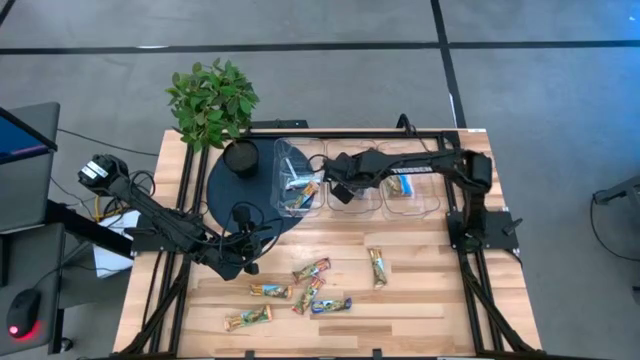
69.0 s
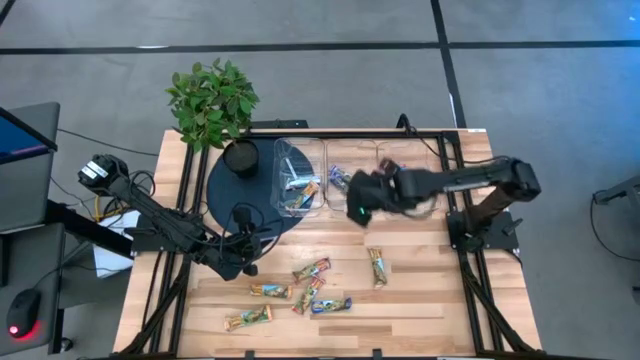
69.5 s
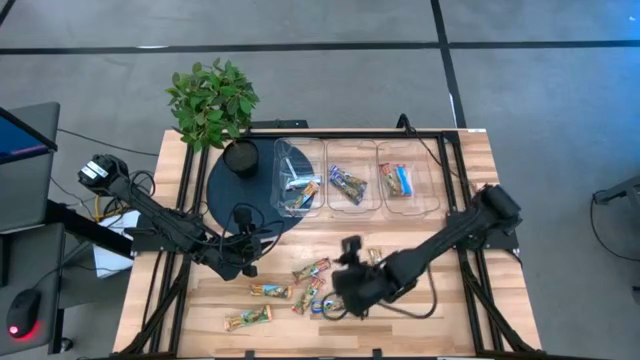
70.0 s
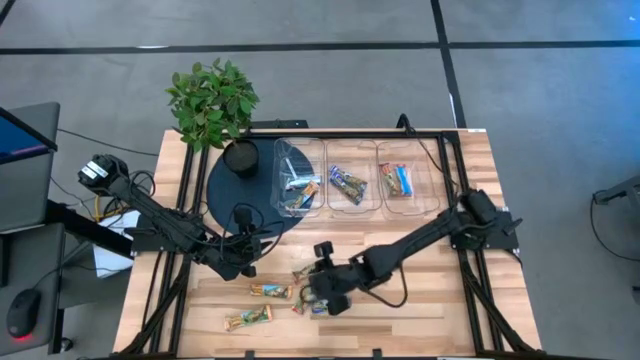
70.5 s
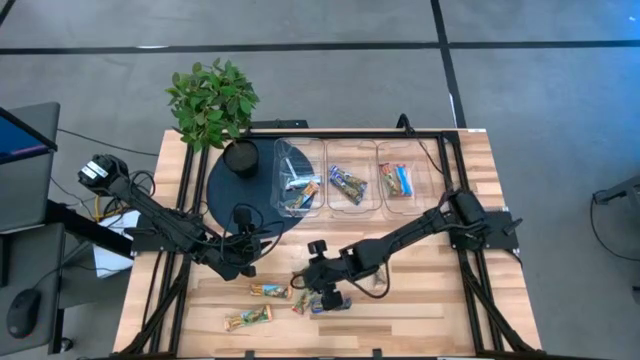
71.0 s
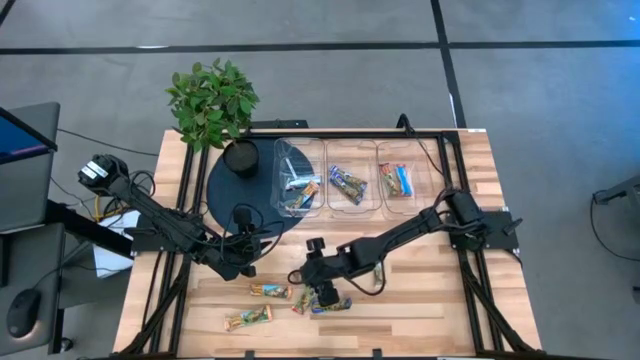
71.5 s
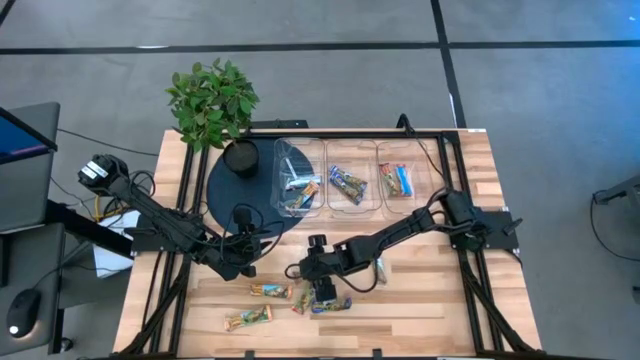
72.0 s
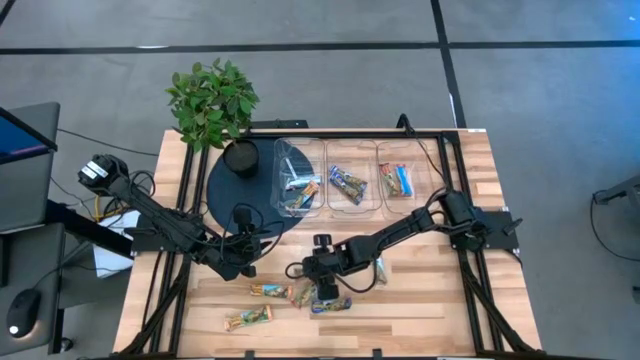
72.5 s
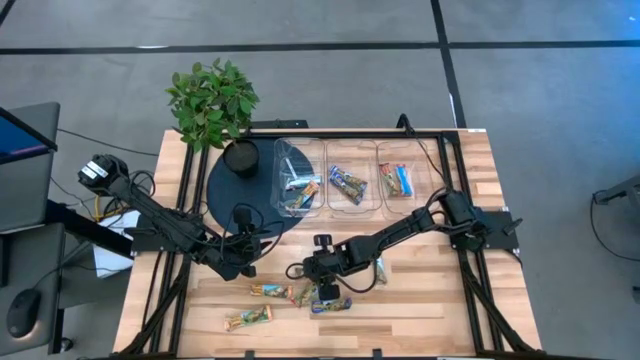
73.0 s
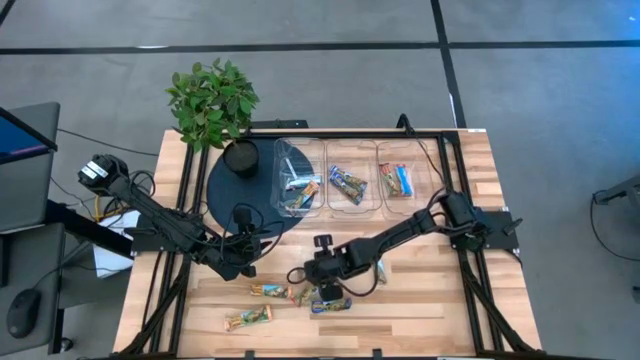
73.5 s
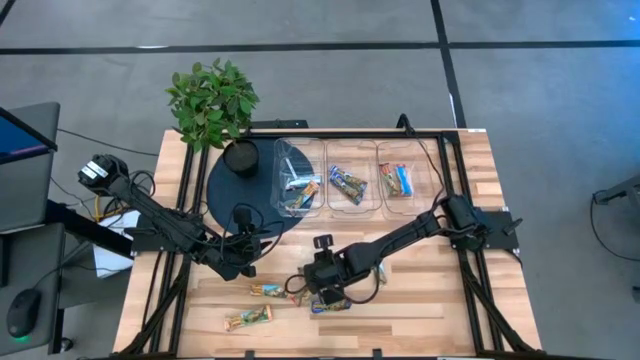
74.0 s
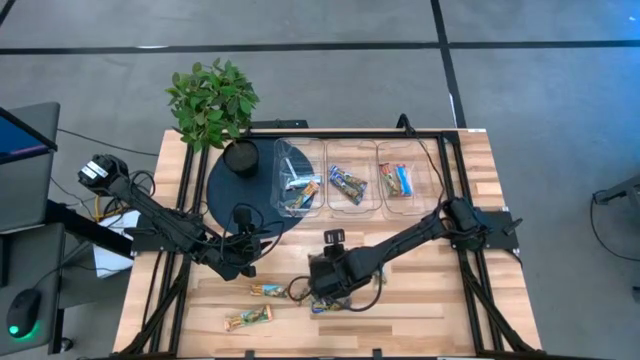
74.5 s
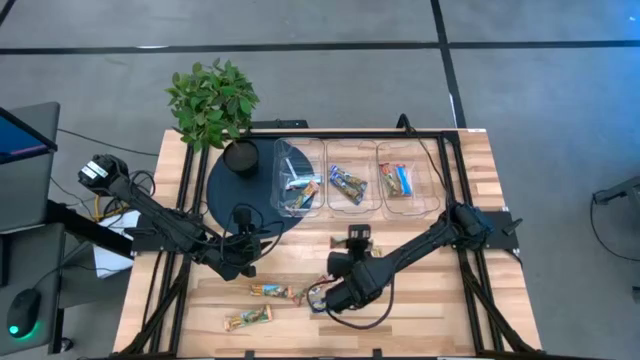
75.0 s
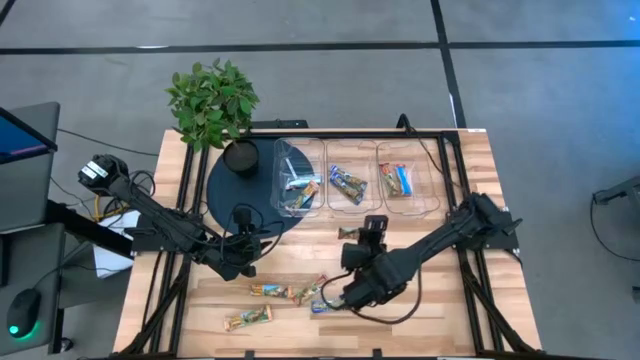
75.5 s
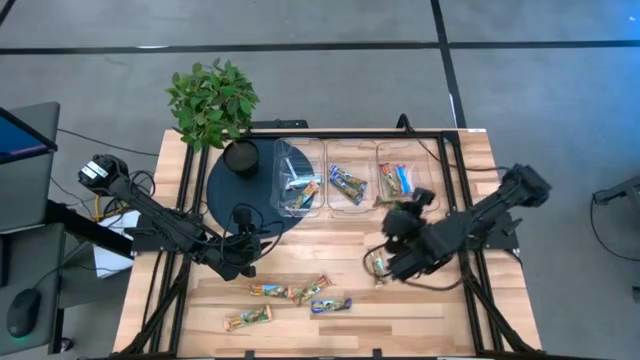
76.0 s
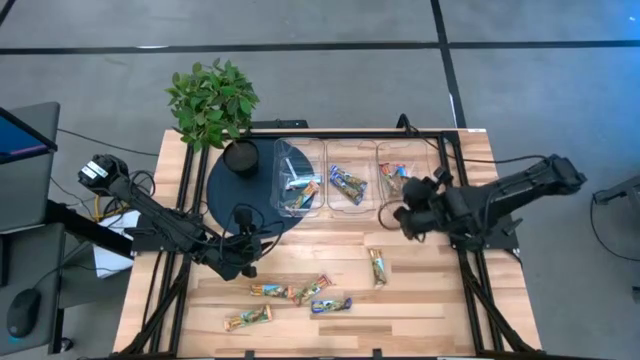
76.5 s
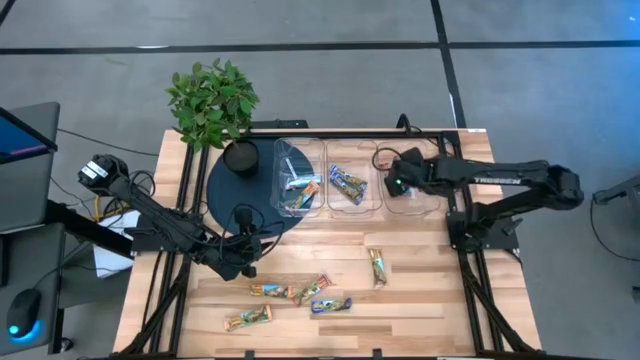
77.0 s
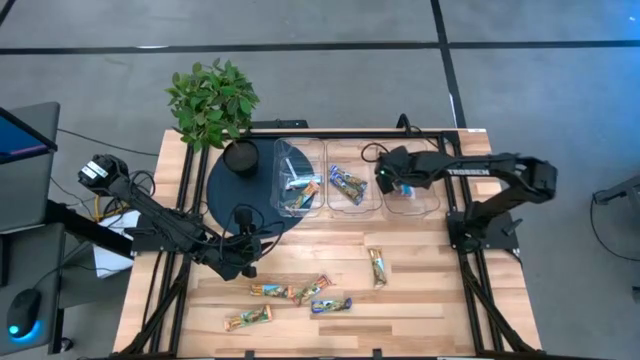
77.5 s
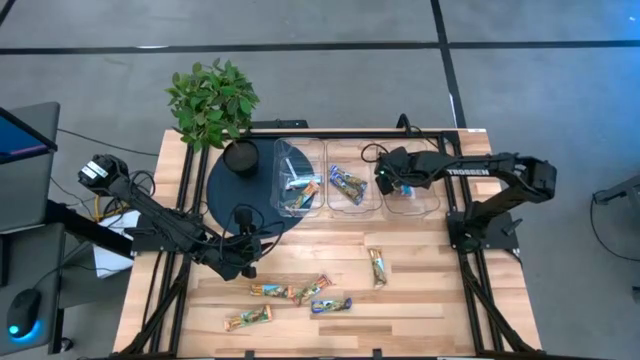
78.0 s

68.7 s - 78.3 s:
Task: Pick and place Granola Bars by type
Put the red granola bar into the right transparent bin

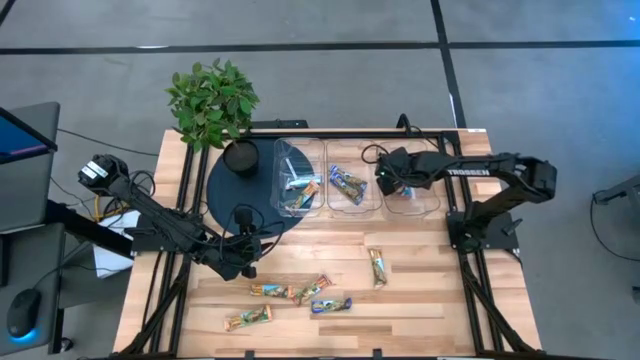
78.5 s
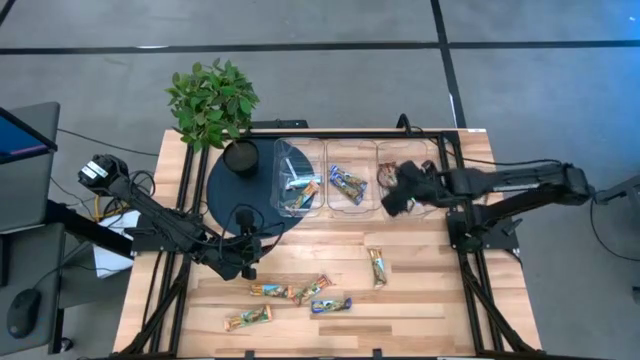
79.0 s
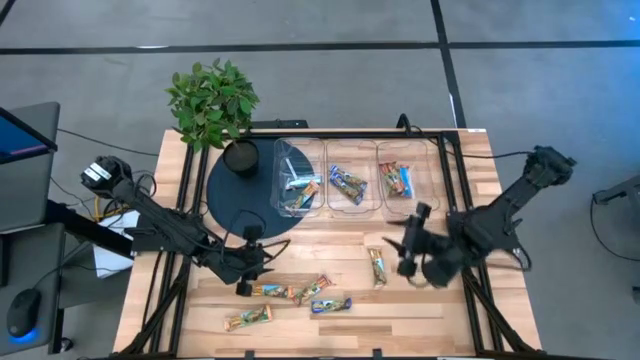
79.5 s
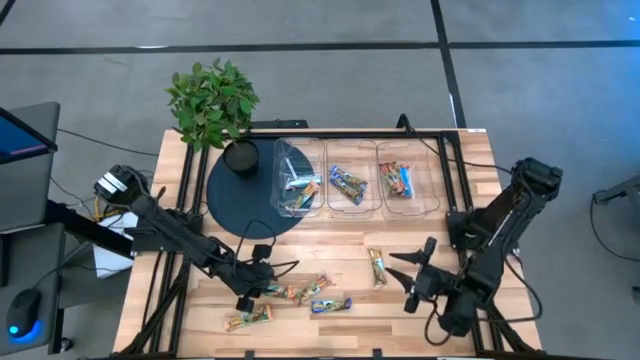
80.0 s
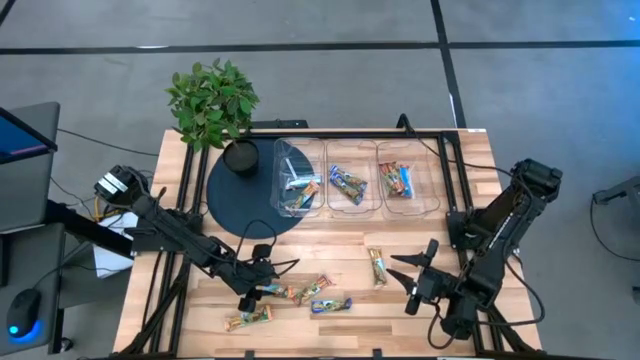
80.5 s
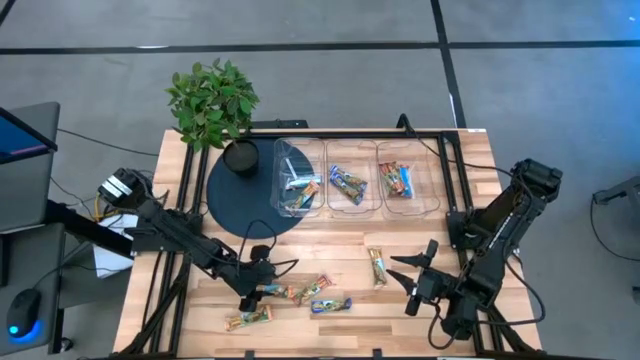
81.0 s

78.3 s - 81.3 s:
Put the yellow granola bar into the left transparent bin

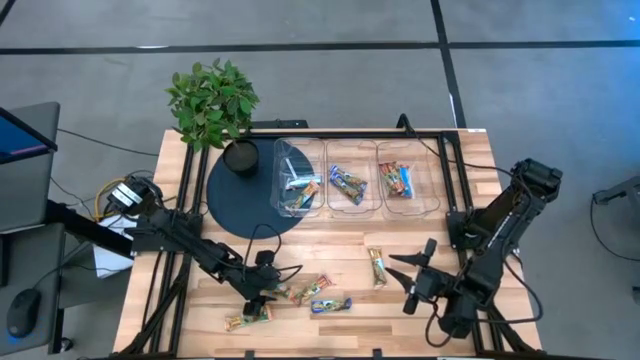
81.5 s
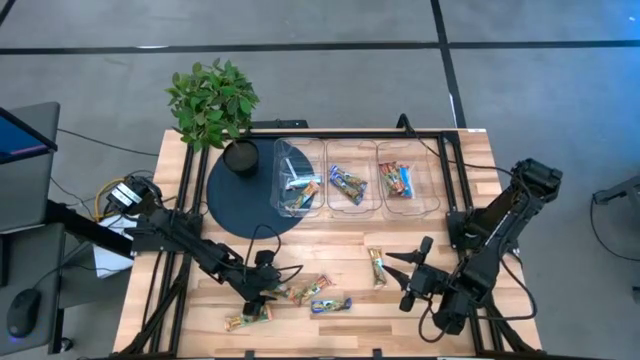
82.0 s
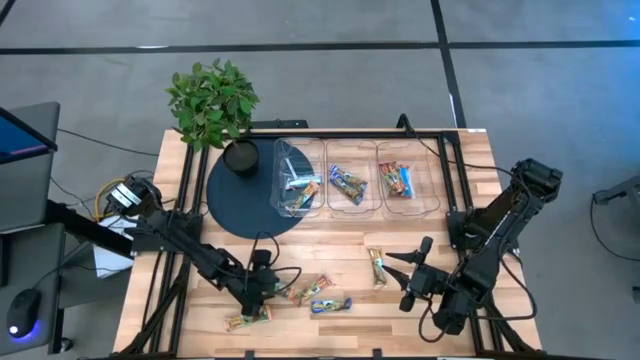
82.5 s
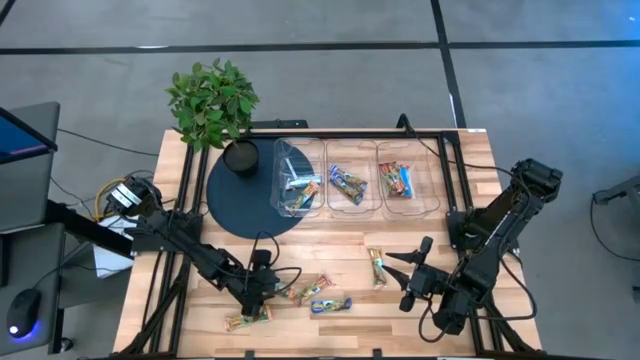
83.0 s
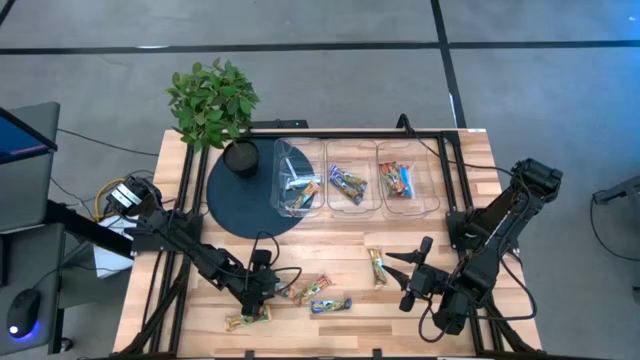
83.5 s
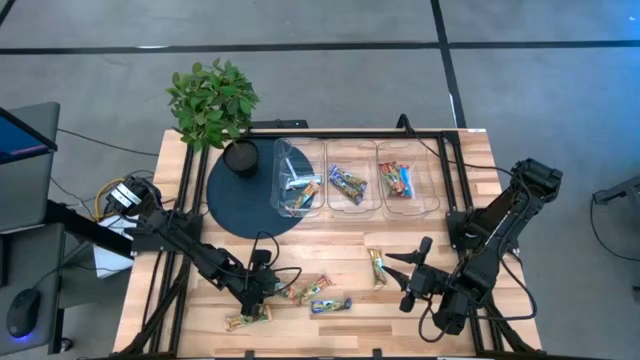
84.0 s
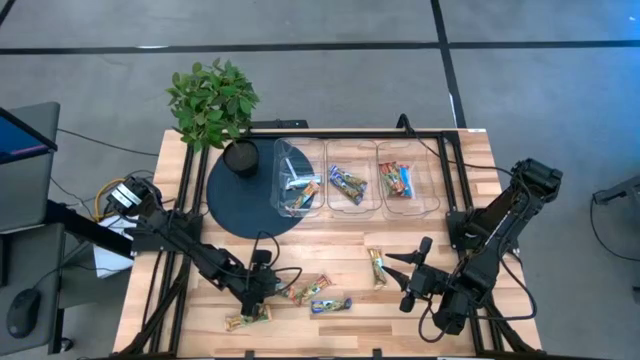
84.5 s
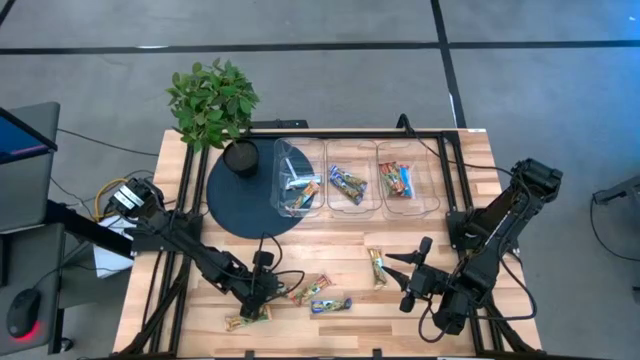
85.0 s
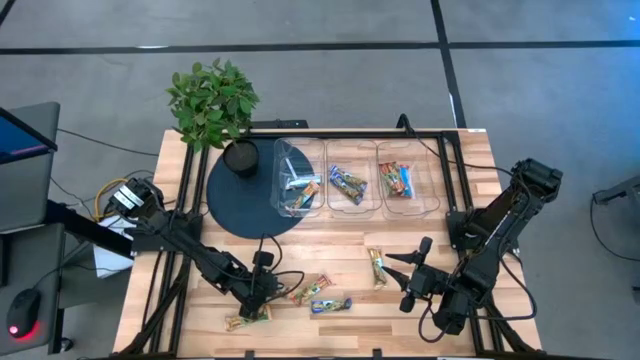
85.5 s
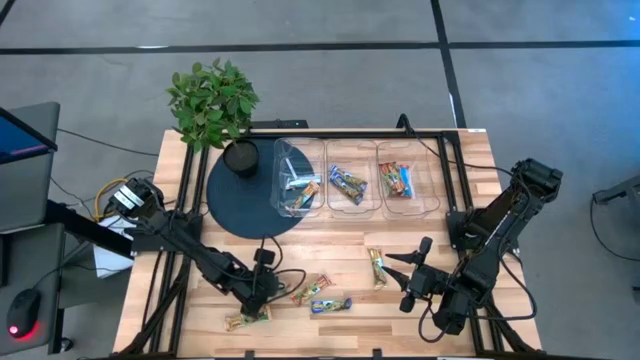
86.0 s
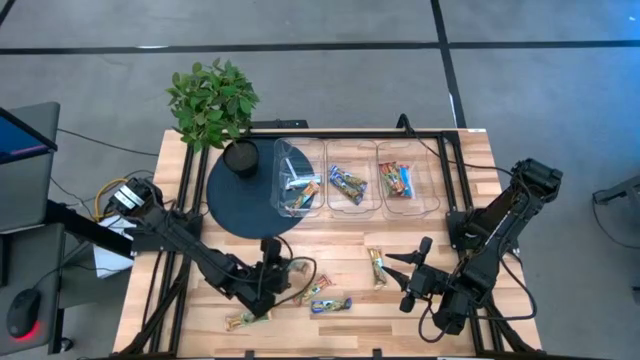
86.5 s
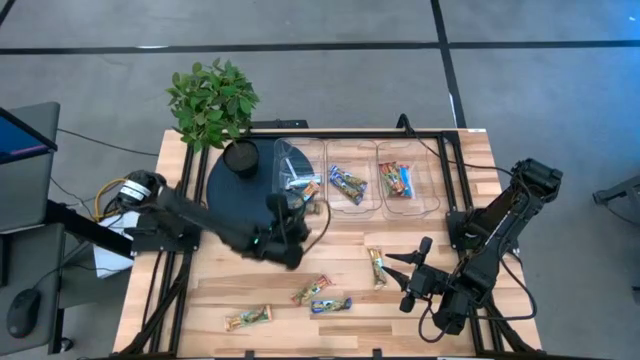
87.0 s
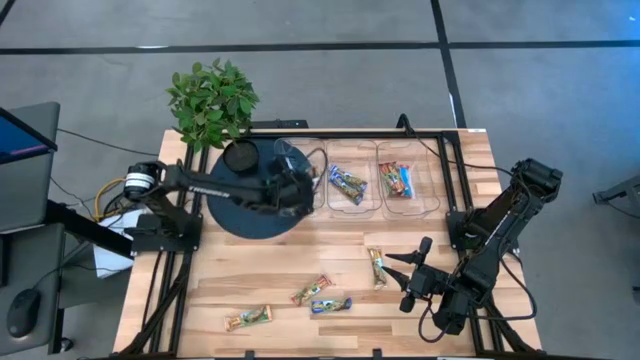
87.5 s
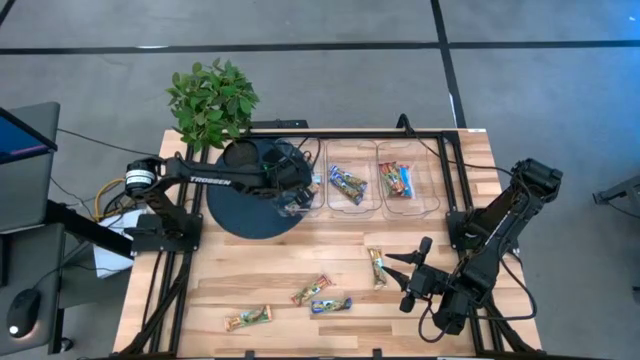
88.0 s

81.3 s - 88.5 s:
Put the yellow granola bar into the left transparent bin

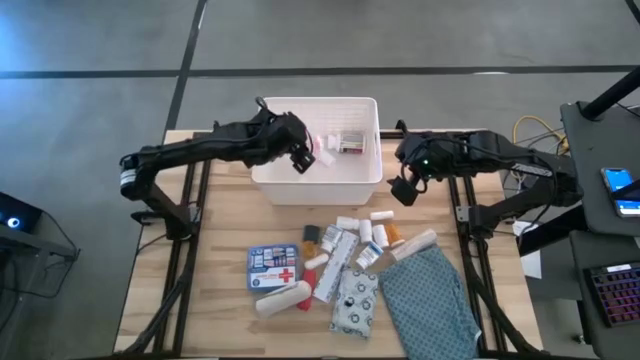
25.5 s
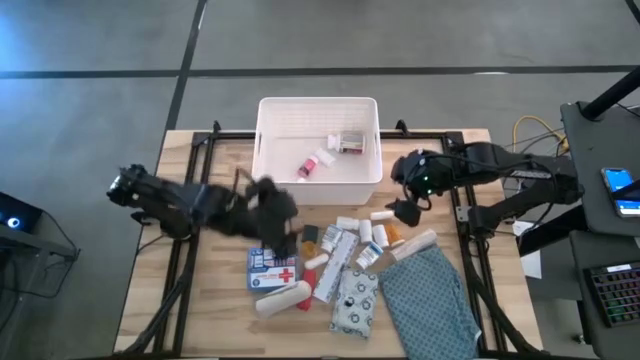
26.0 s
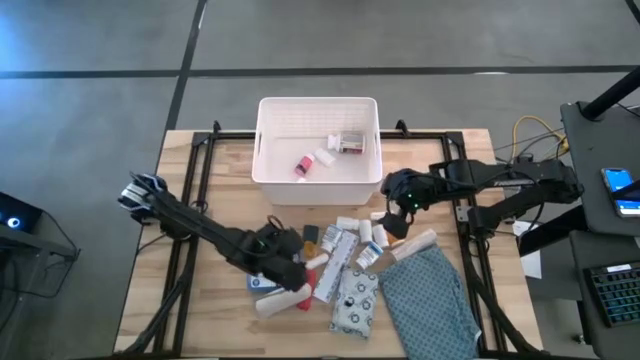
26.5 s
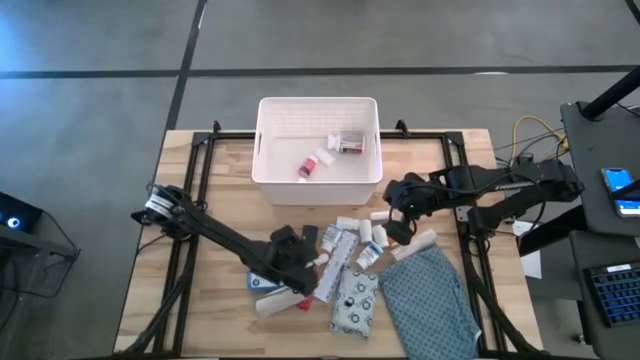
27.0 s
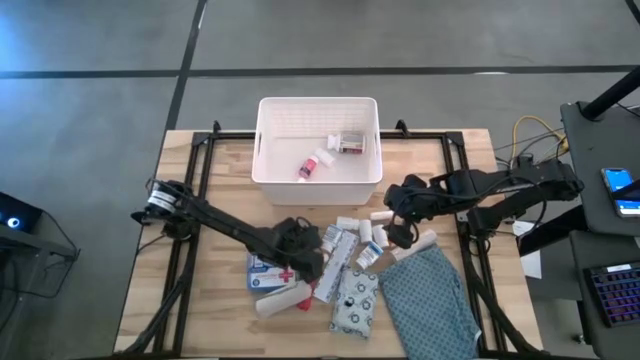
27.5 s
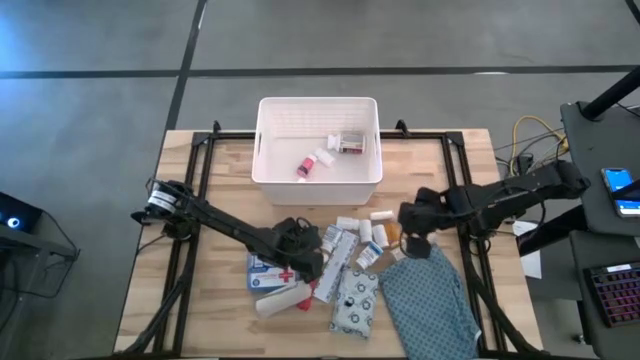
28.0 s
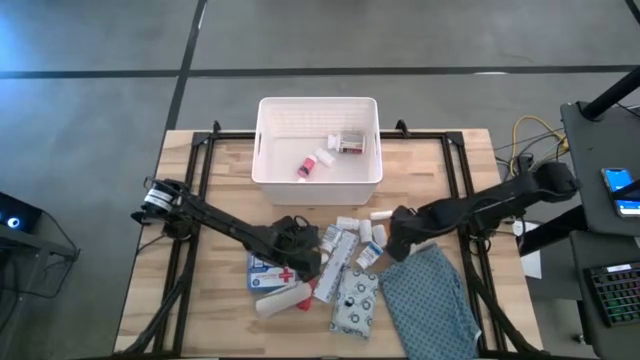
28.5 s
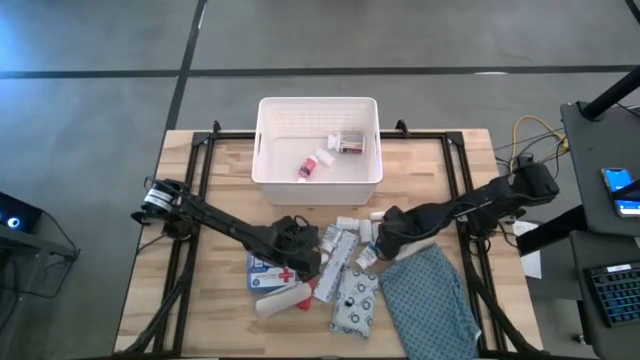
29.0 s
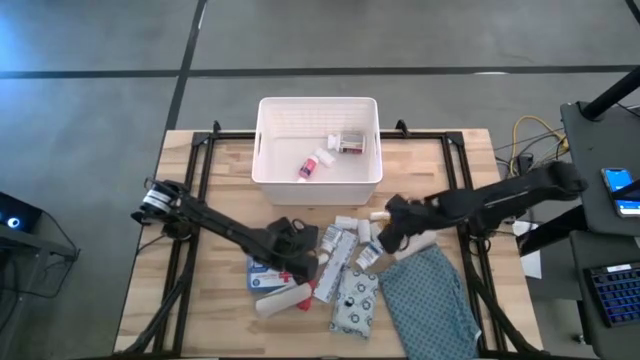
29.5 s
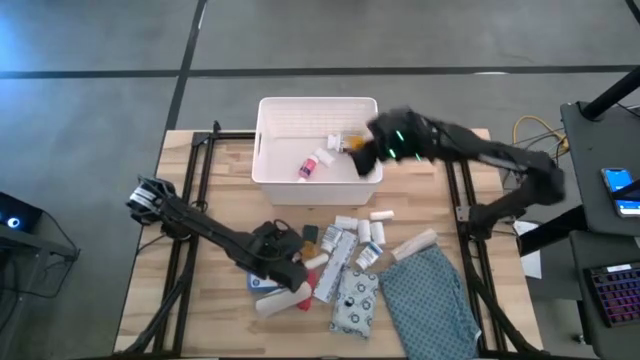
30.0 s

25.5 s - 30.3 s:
Task: Pick & place medical supplies in basket/bin
Put the orange bottle into the white bin
